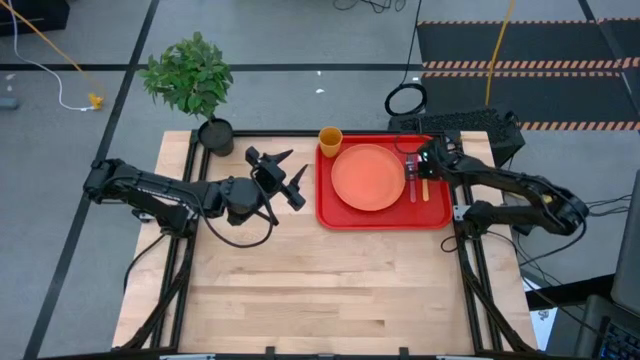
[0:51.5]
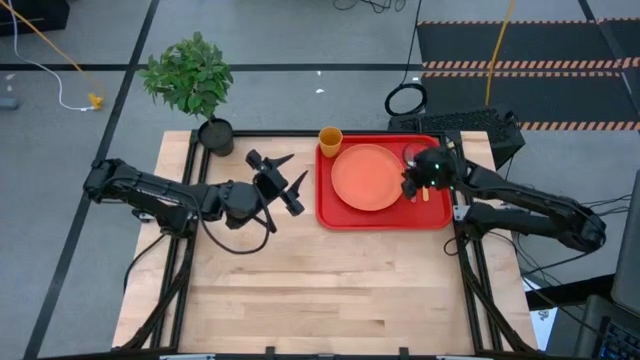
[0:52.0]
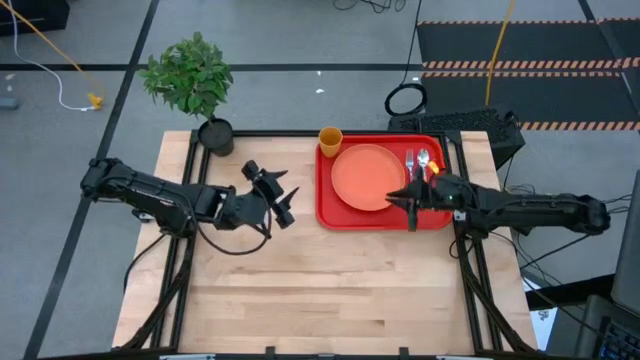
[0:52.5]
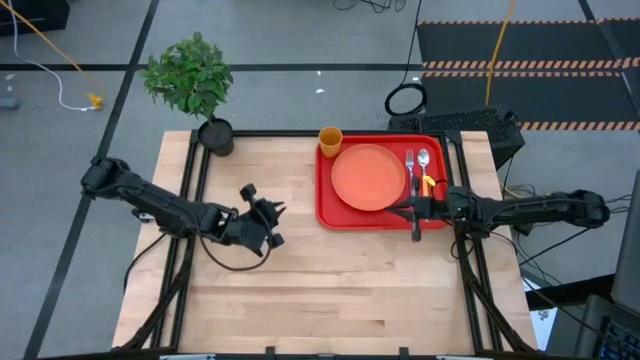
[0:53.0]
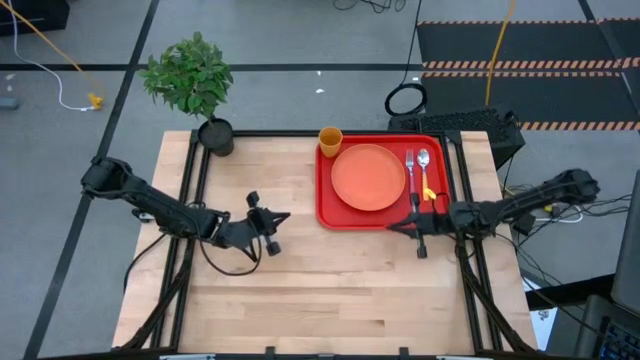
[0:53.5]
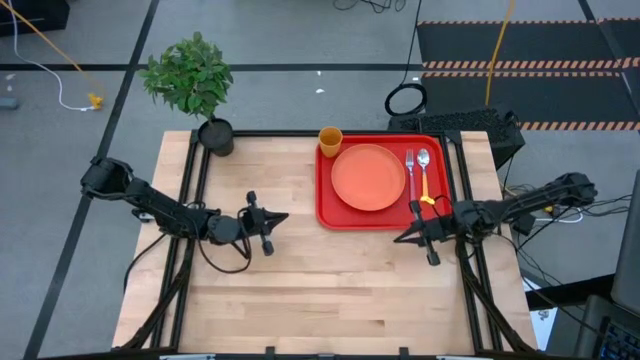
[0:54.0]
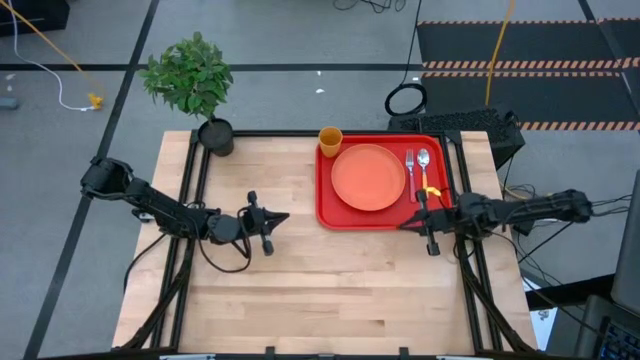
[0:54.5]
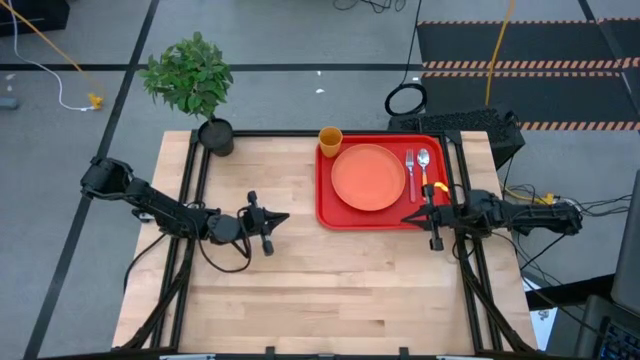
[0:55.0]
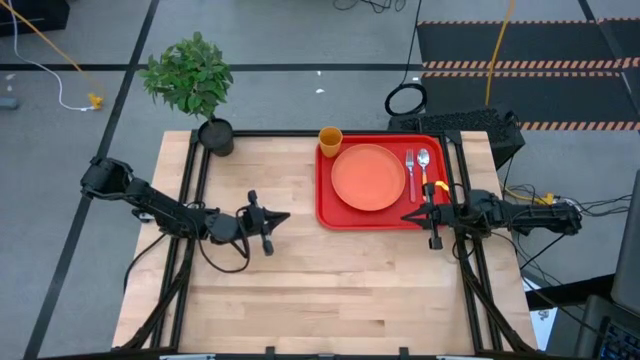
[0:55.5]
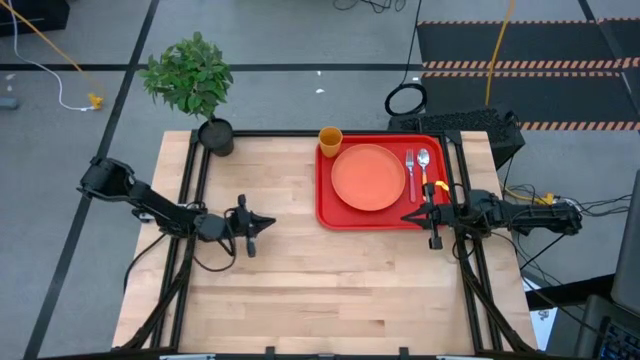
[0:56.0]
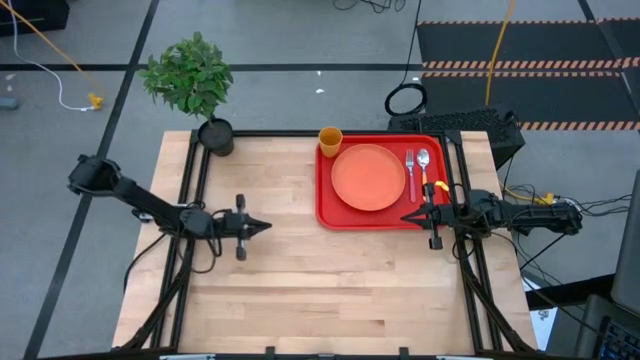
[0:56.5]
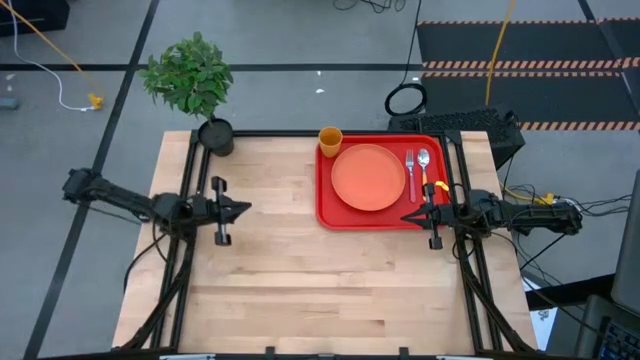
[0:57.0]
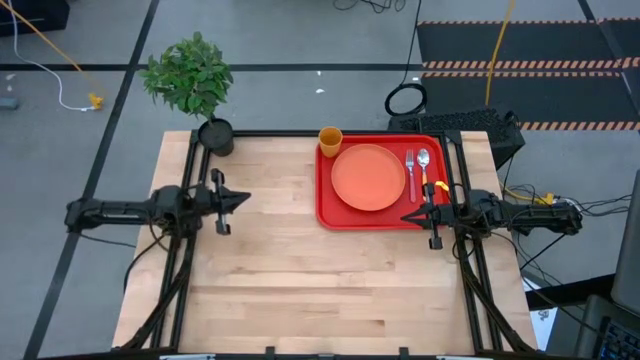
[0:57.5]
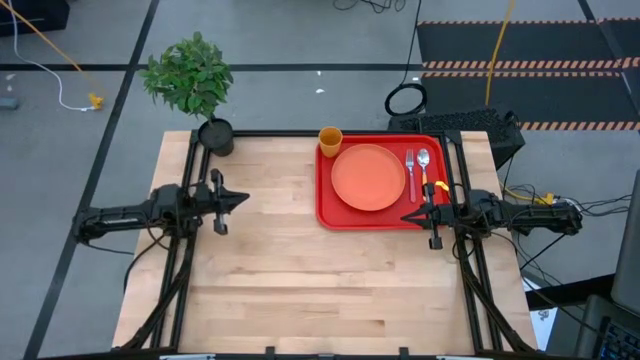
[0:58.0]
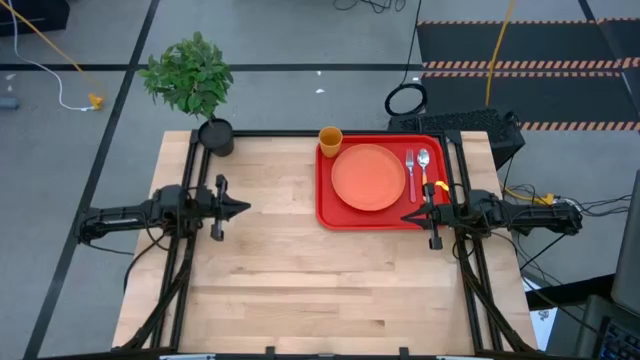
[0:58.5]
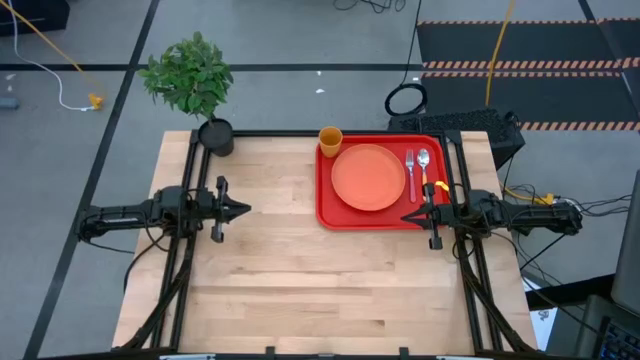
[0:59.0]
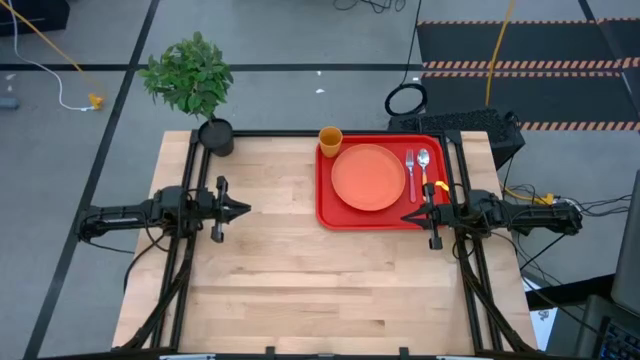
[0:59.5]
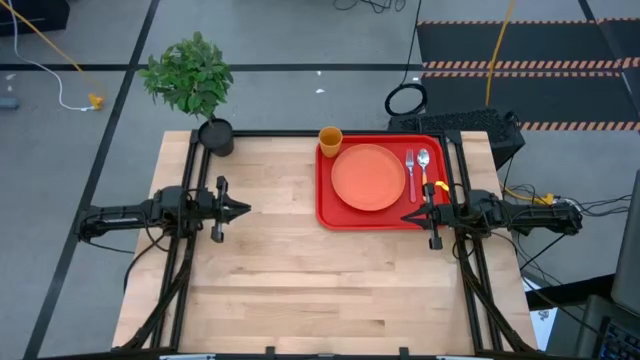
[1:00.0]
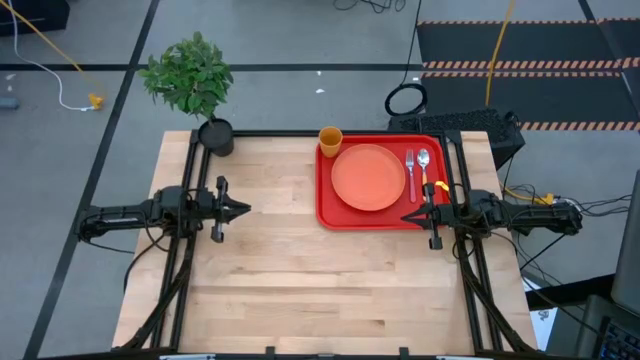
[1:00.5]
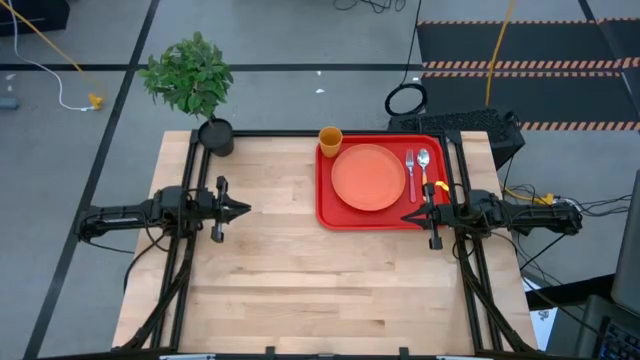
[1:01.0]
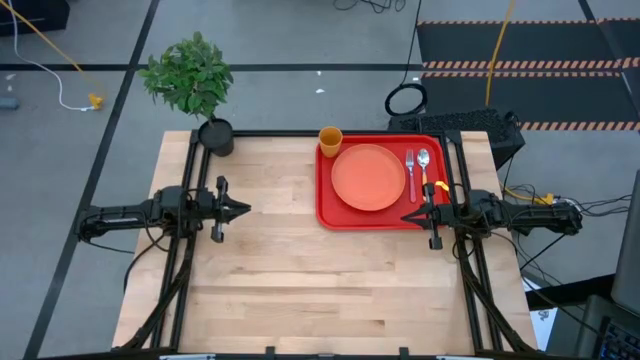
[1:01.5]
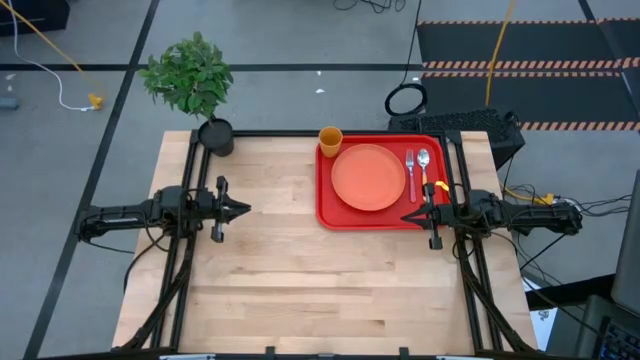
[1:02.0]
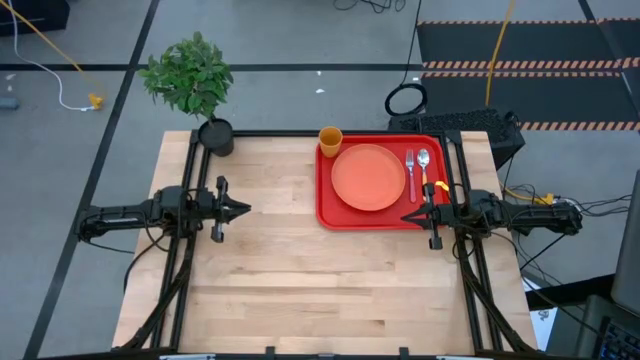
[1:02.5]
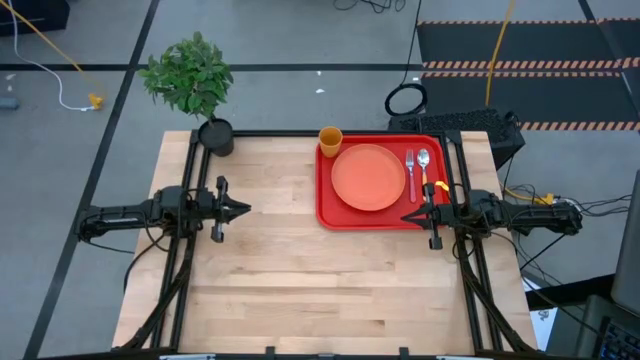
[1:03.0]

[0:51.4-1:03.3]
Task: Pick and place plate/cup/fork/spoon on tray
Return to Home Position

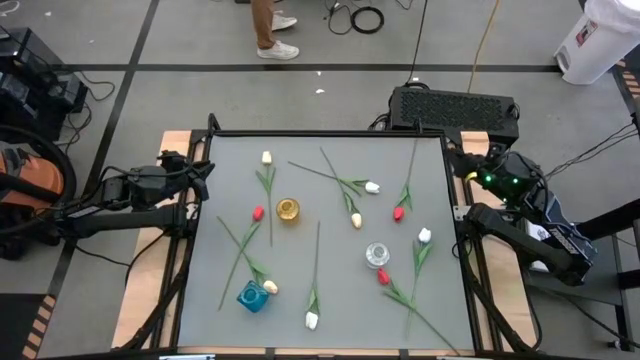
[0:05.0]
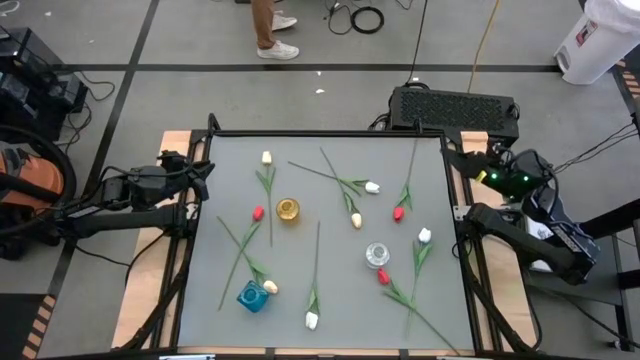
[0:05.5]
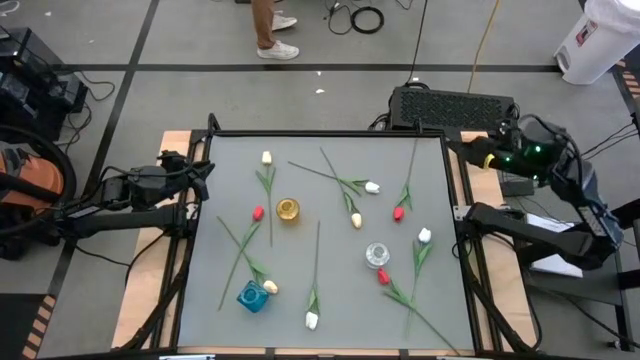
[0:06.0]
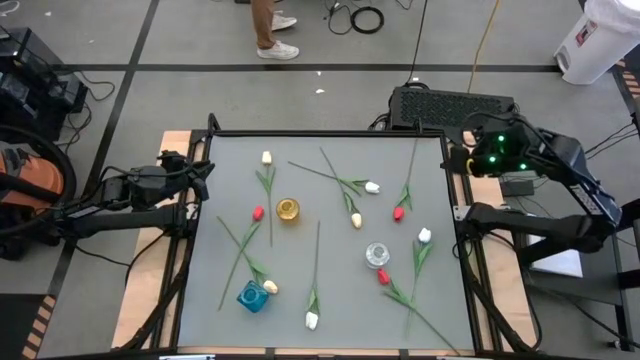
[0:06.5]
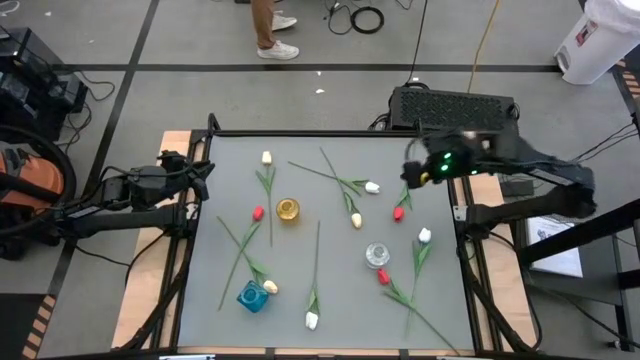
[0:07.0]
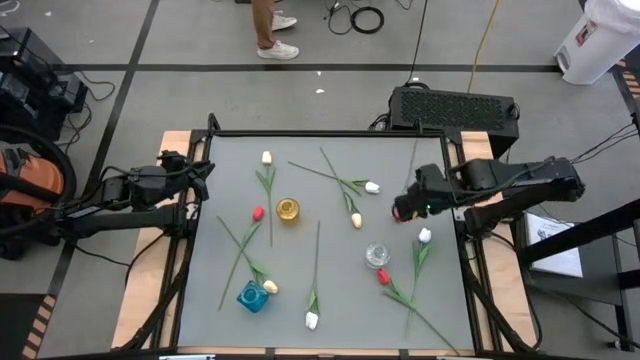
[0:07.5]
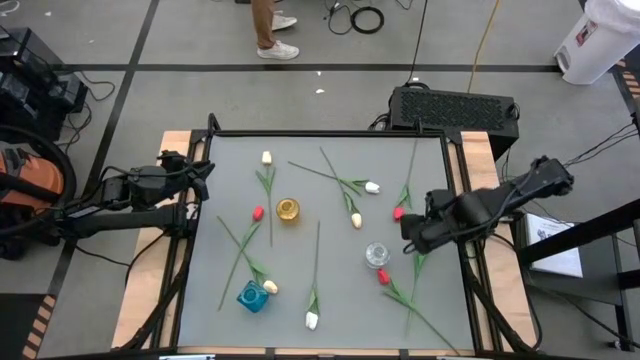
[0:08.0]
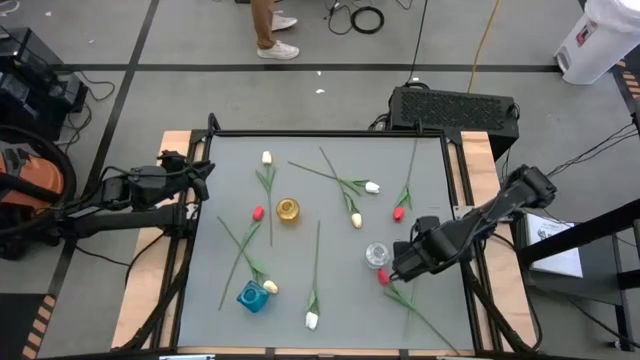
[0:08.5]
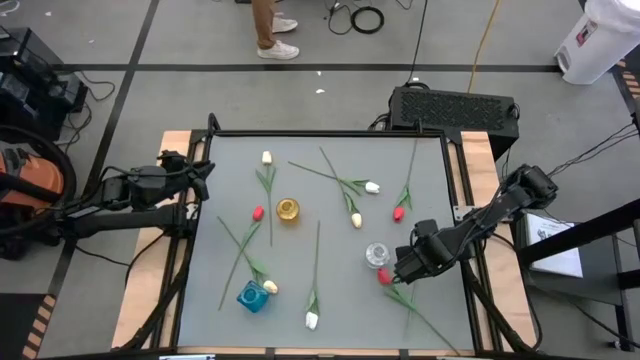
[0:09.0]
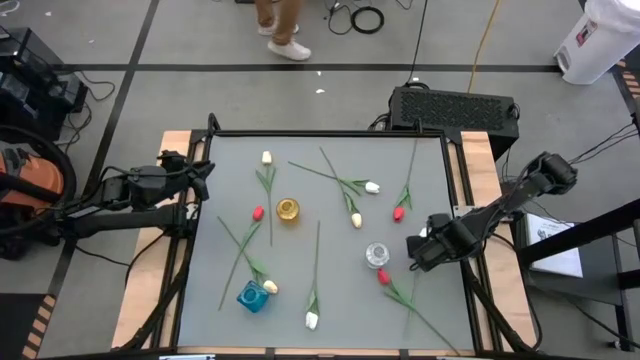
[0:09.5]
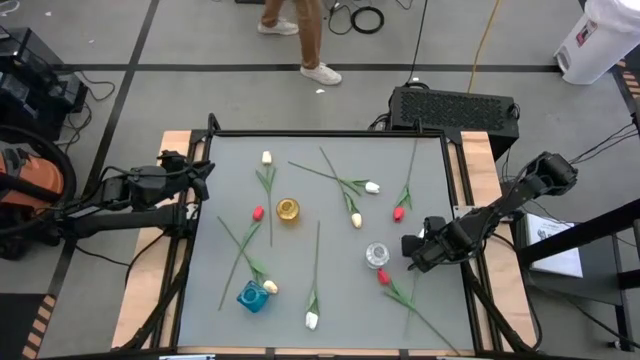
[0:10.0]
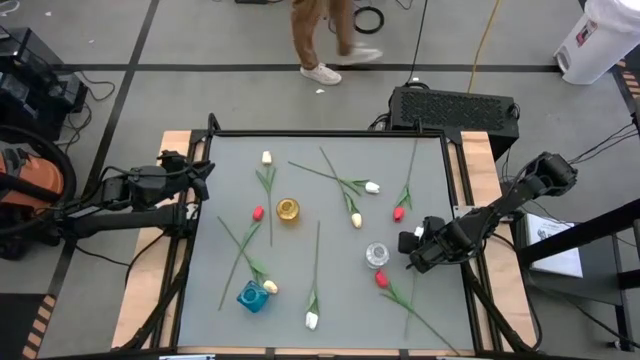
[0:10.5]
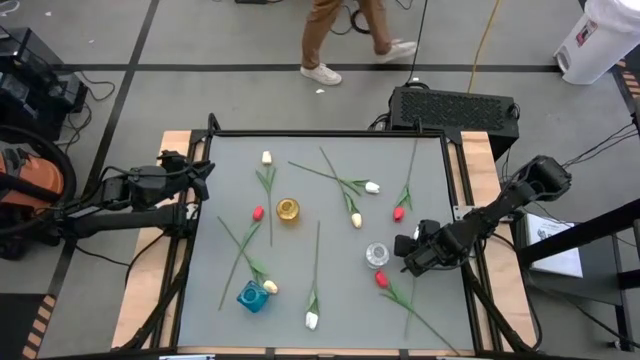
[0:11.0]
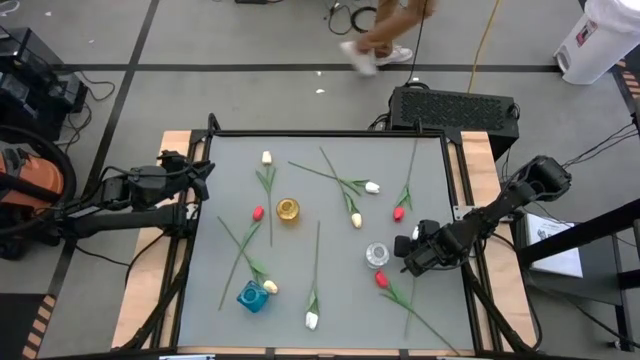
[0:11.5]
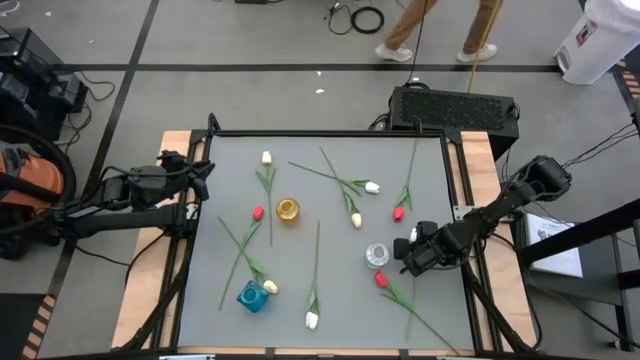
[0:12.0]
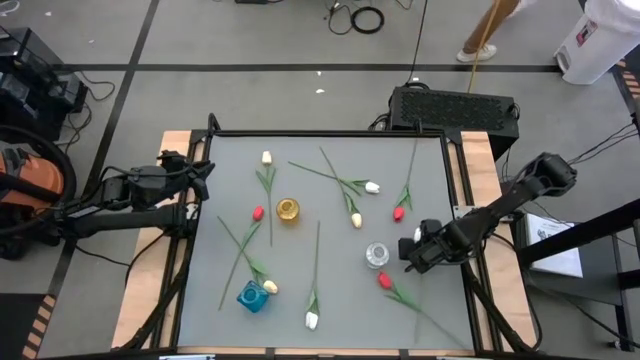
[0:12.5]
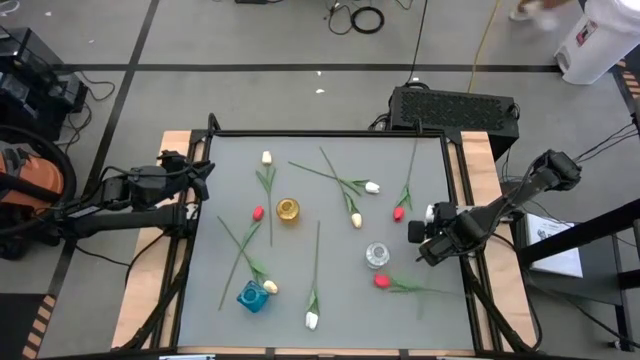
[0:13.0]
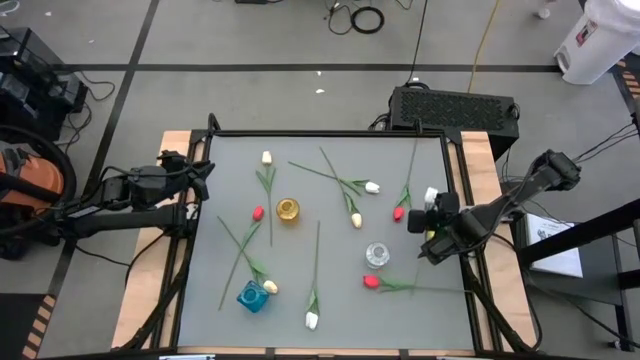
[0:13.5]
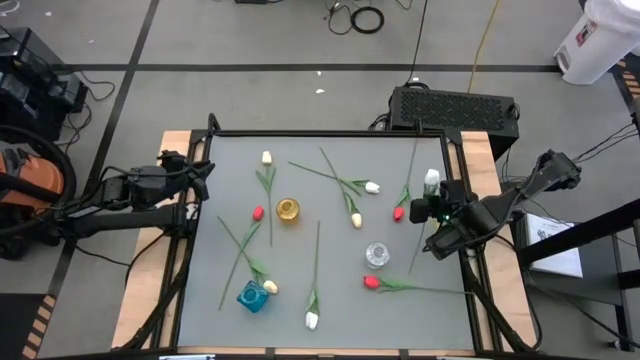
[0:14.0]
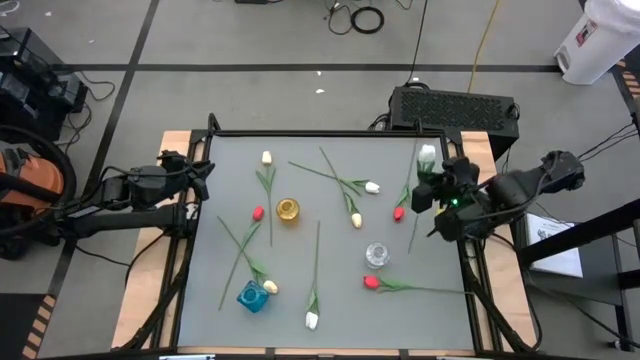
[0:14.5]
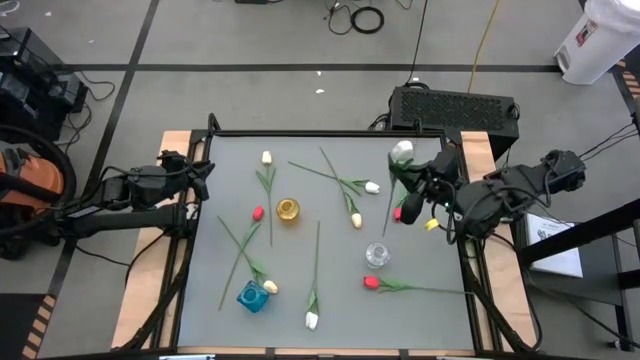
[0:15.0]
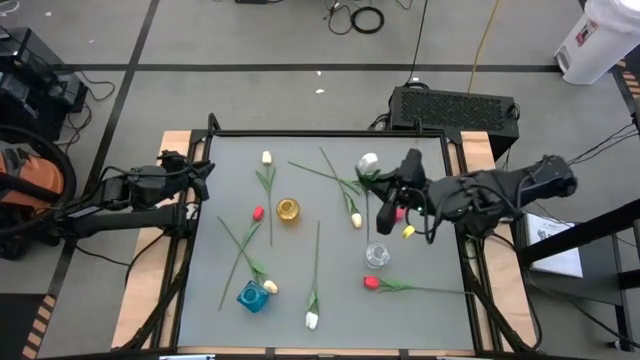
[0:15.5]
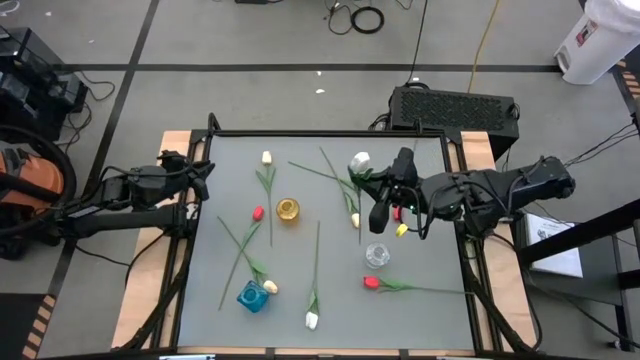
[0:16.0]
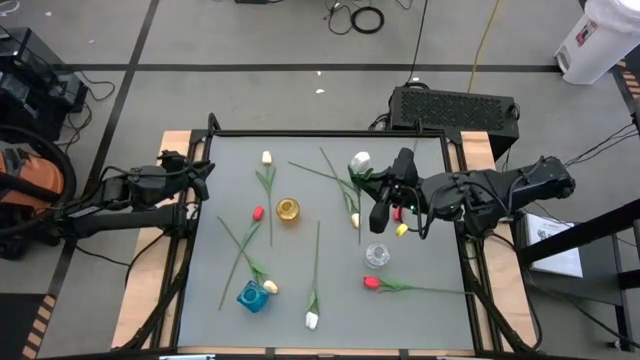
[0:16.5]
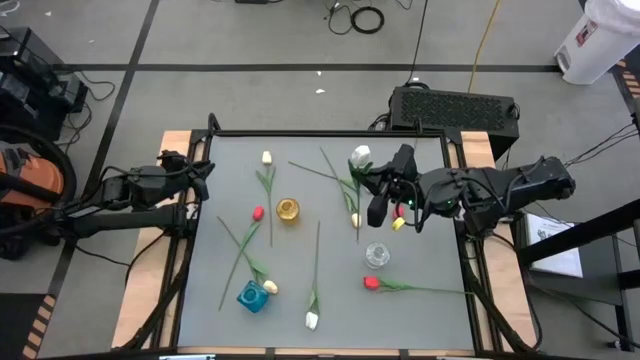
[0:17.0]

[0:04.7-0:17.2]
Task: Sort flowers into vase by color
Put the bottom right white tulip into the yellow vase
